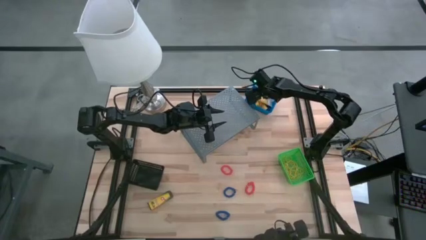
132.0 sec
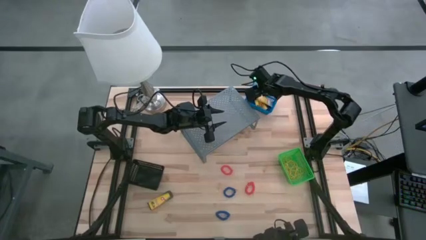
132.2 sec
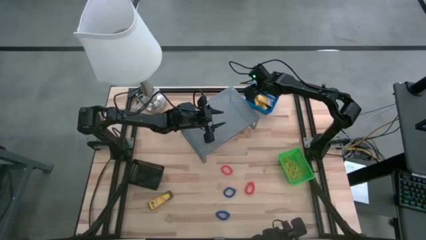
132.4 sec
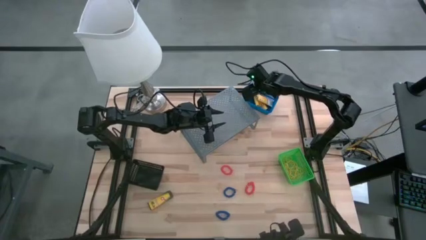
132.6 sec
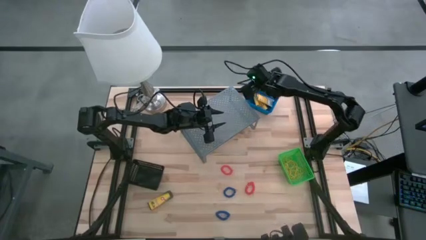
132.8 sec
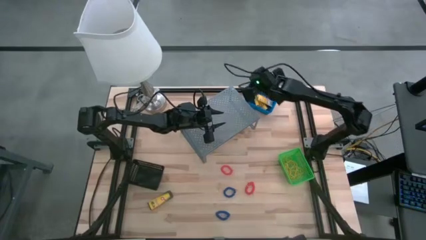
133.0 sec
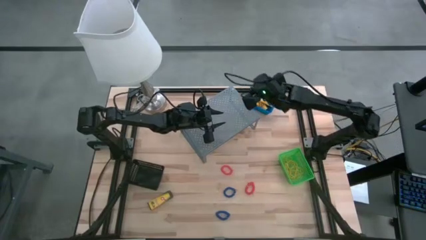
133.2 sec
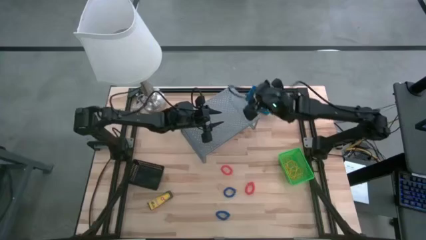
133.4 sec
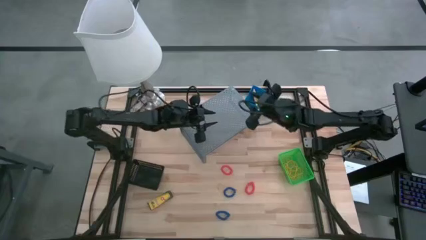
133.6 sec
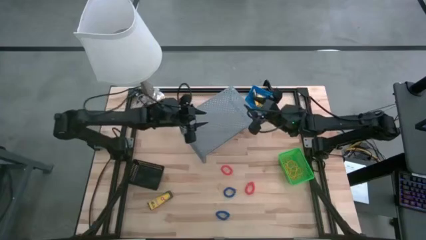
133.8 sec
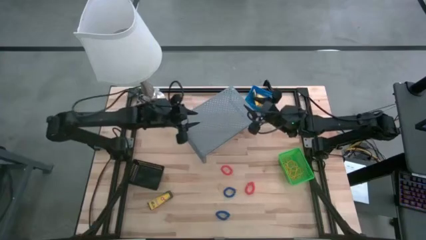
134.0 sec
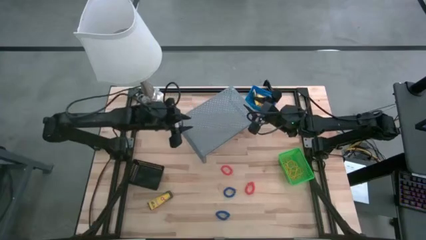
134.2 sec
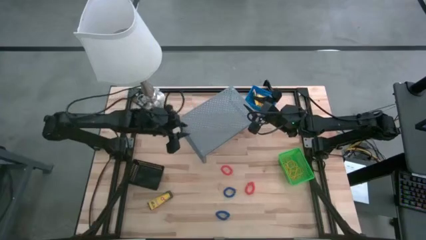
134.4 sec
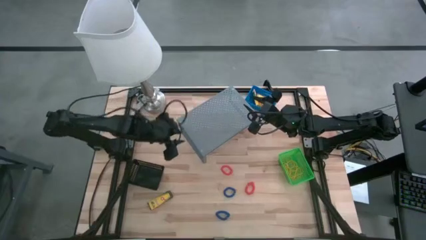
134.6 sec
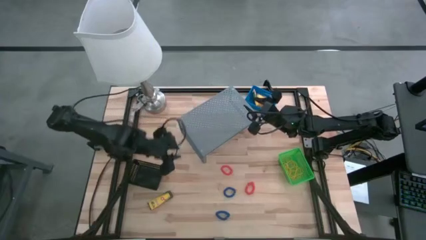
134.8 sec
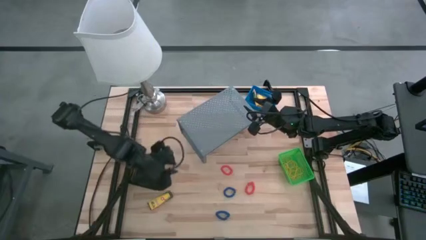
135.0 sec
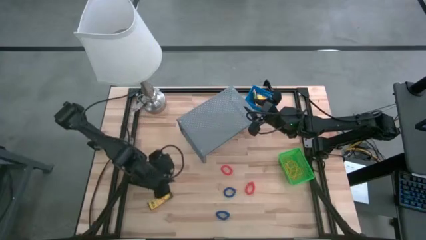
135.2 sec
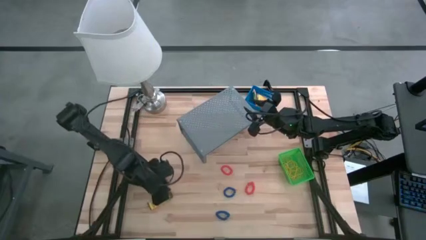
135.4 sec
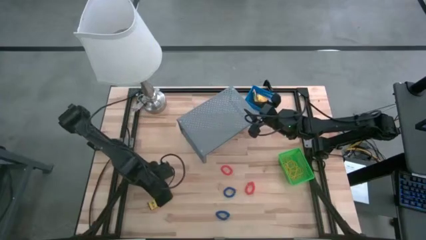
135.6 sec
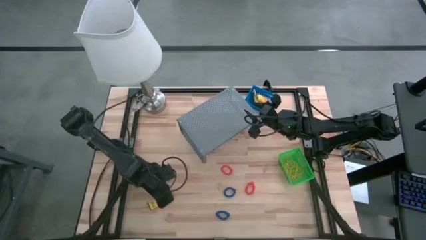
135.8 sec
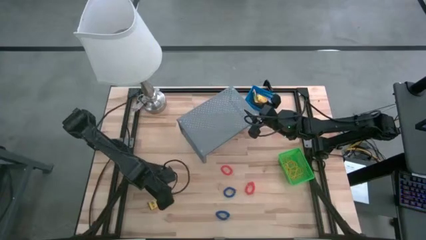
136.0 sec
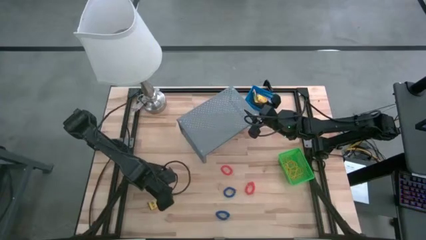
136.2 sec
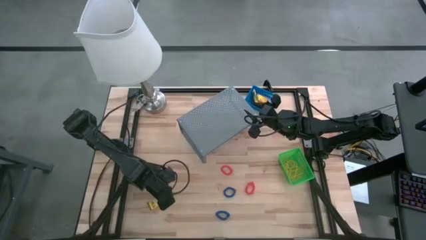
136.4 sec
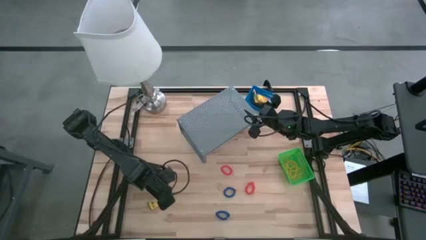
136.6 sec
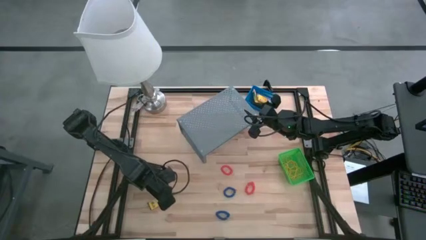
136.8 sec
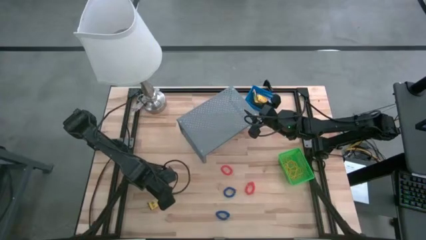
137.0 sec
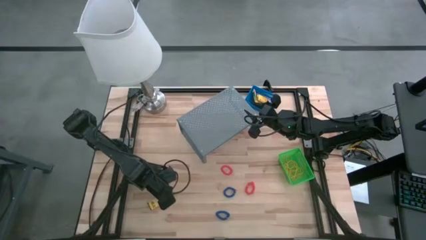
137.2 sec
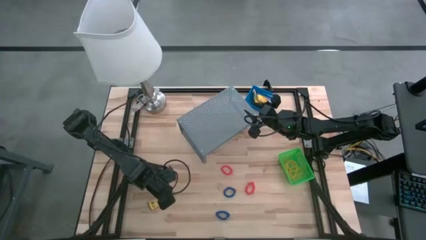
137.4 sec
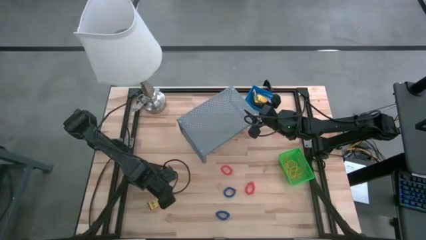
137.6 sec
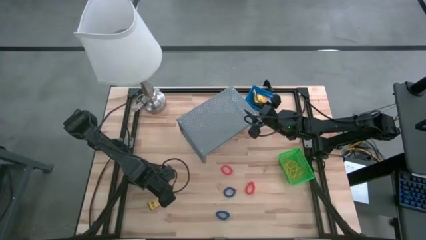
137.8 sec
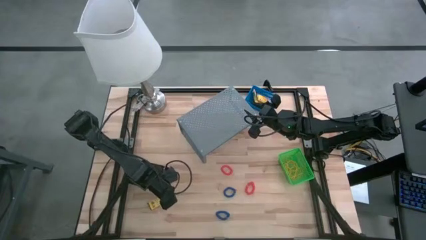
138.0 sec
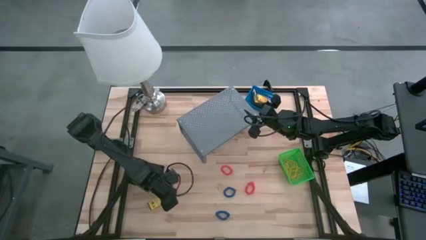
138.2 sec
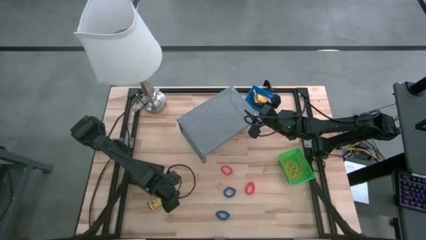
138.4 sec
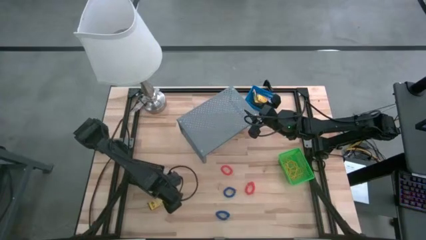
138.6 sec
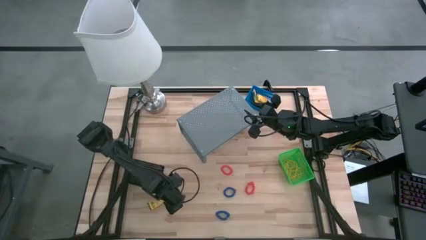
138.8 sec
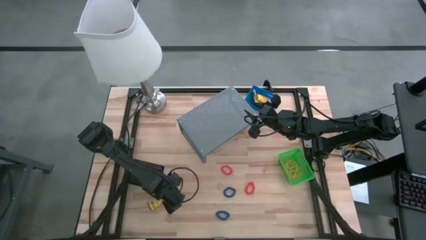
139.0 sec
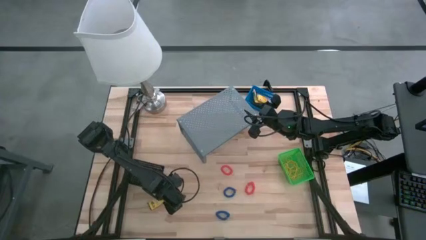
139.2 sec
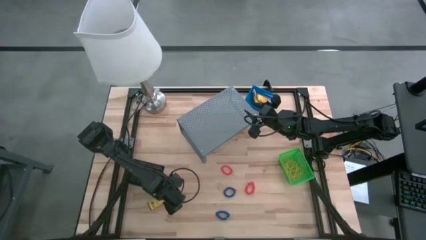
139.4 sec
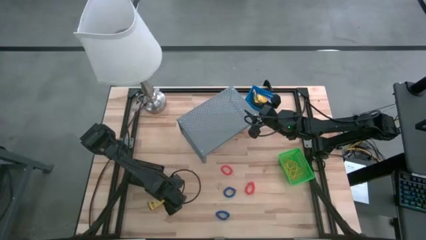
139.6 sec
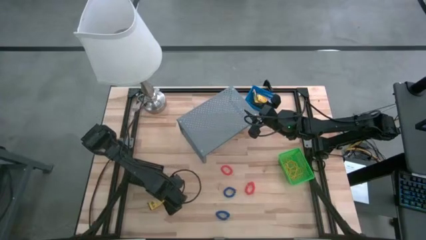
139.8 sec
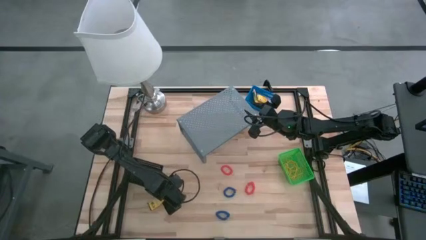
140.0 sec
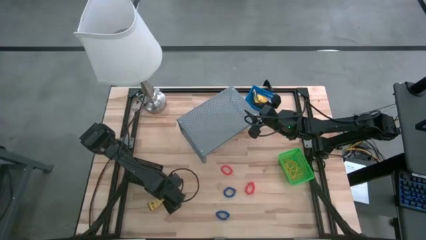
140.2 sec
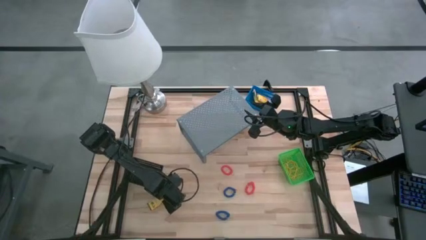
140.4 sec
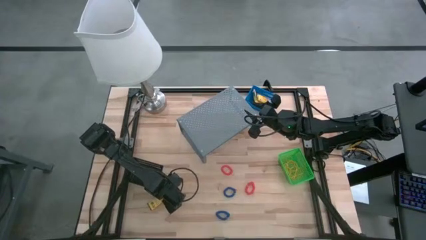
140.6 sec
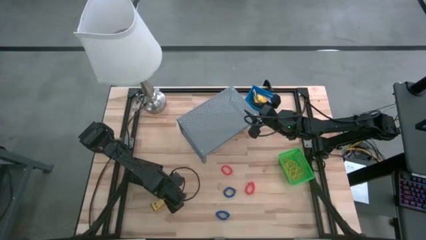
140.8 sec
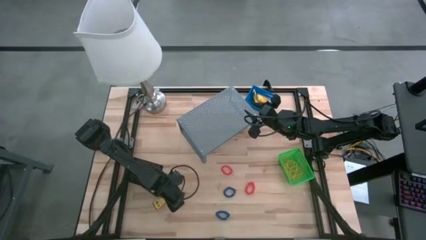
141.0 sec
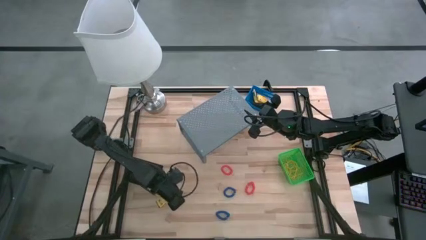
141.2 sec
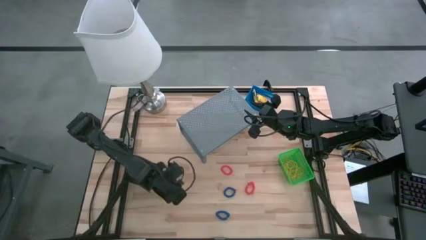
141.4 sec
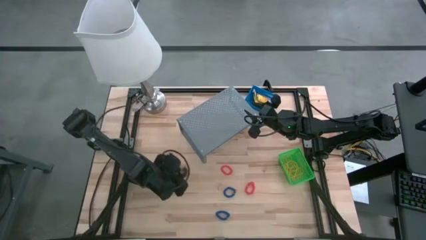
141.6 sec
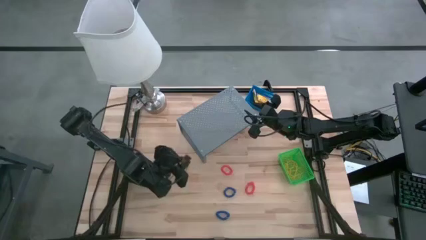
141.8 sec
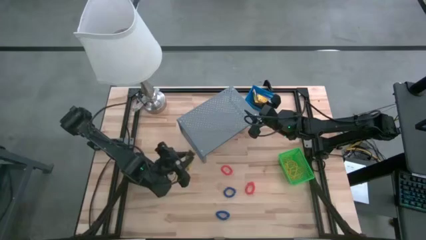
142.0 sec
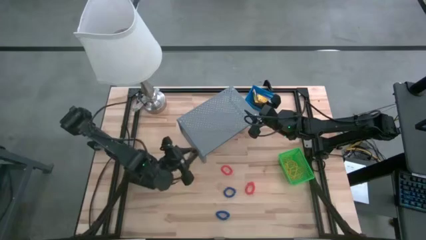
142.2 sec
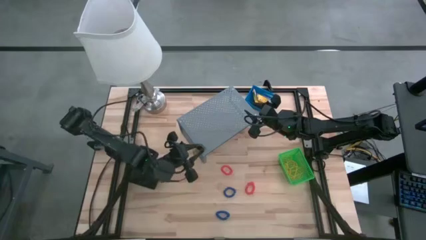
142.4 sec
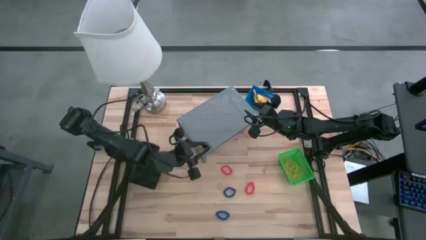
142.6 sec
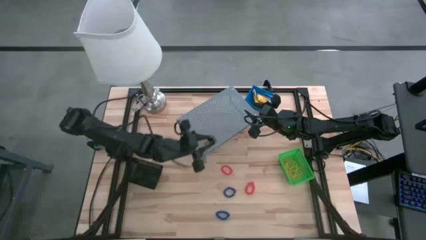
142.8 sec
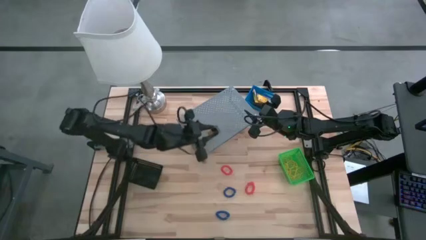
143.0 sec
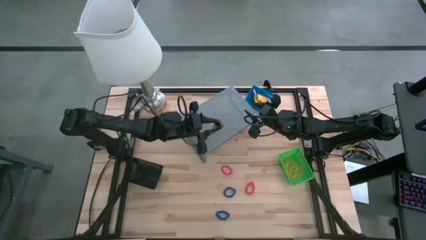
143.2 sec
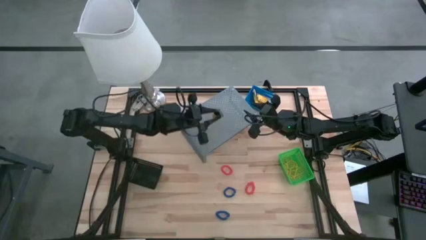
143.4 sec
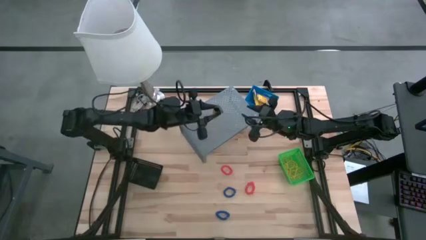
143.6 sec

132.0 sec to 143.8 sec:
Task: Pick & Place Office Desk Supplies
Put the crayon box into the blue basket

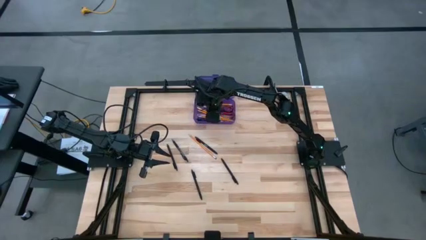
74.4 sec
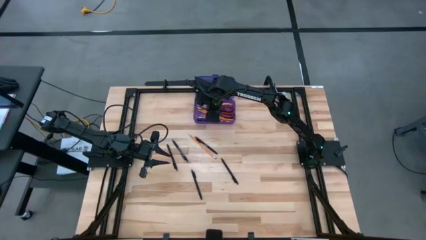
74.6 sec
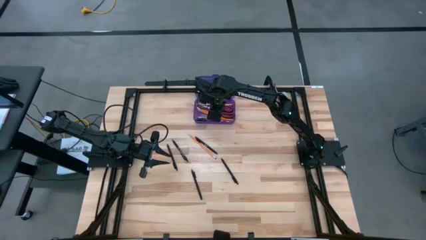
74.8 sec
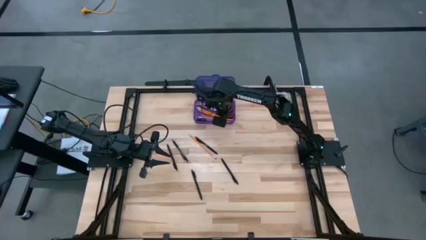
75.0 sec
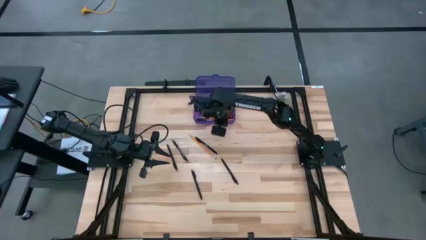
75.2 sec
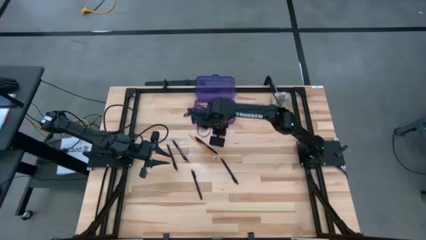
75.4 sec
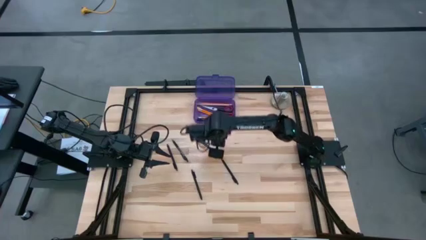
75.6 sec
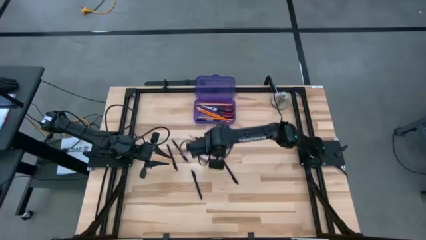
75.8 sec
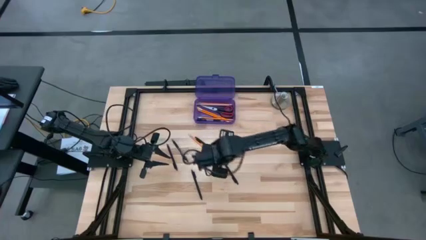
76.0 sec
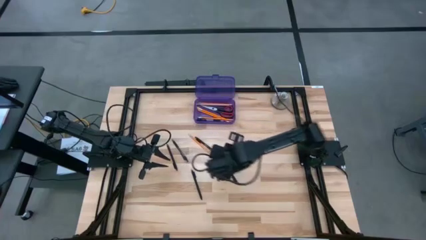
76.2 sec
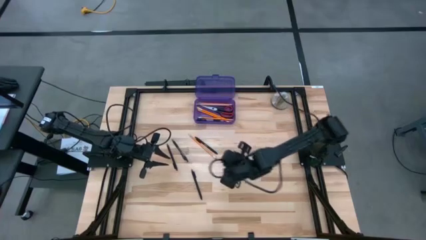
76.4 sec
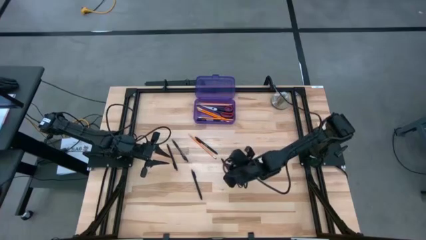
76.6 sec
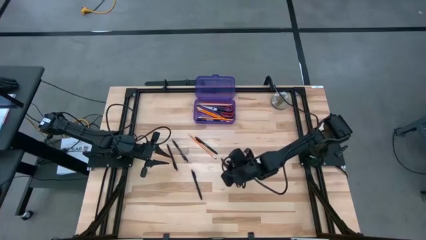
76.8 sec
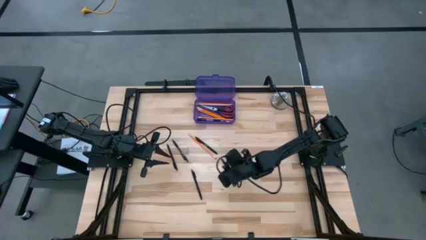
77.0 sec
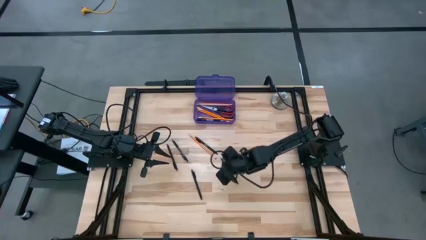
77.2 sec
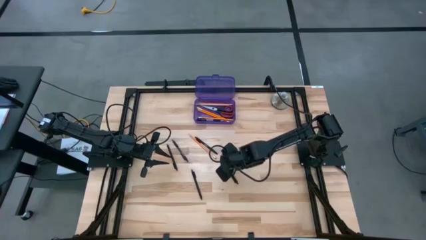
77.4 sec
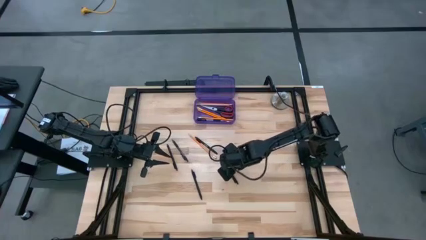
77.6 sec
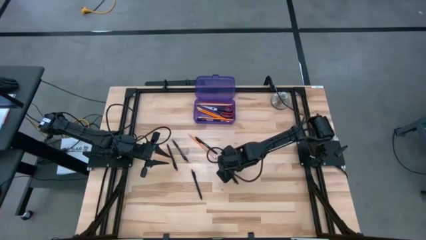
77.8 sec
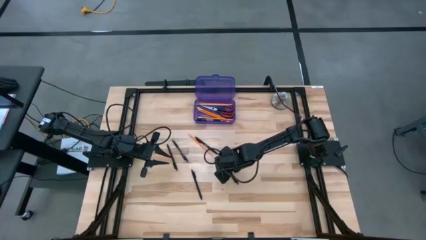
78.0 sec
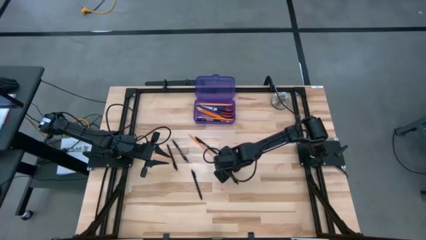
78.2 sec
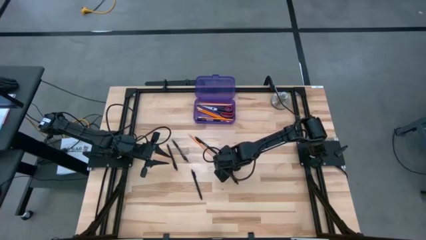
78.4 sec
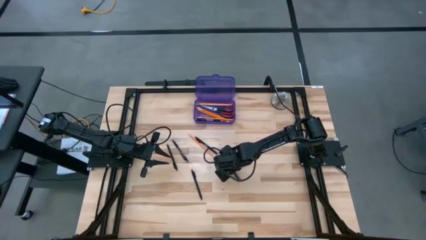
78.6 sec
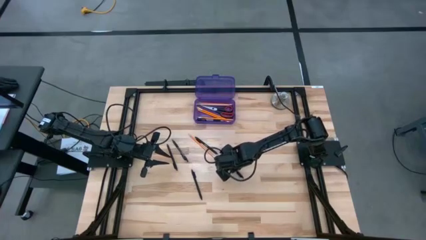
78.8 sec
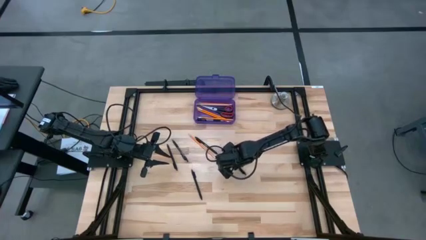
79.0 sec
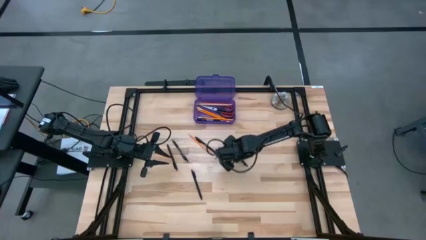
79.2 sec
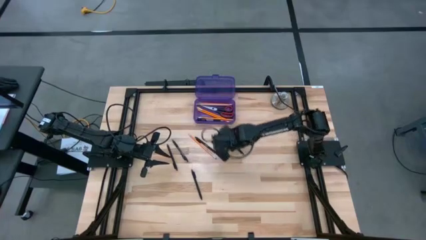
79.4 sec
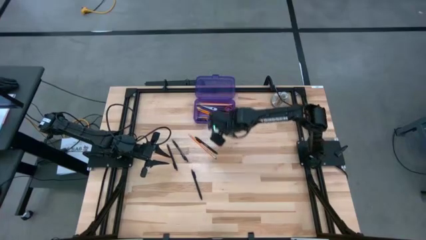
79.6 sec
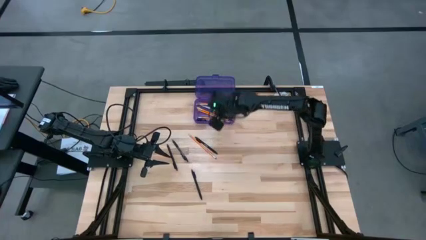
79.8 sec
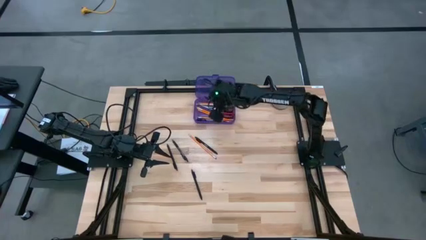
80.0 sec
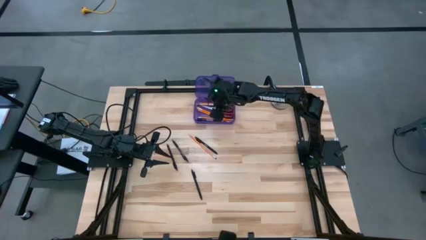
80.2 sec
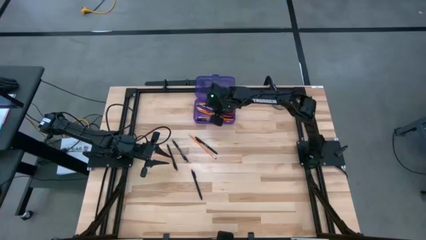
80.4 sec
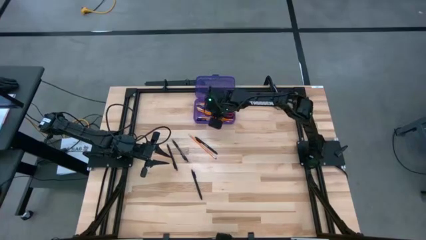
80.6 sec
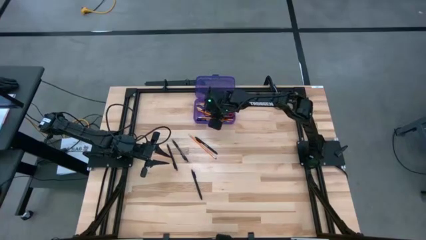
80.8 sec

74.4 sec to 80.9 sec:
Task: Pick & place school supplies into a supply box
Put the black pen into the violet supply box
